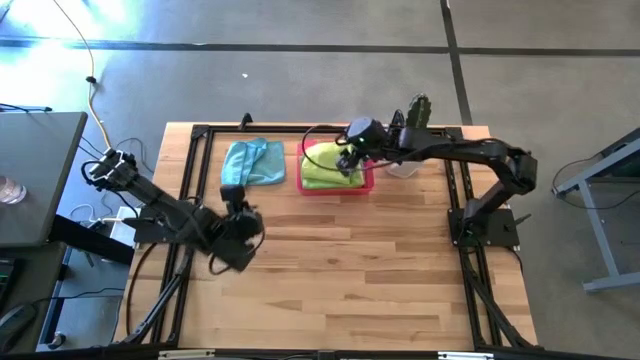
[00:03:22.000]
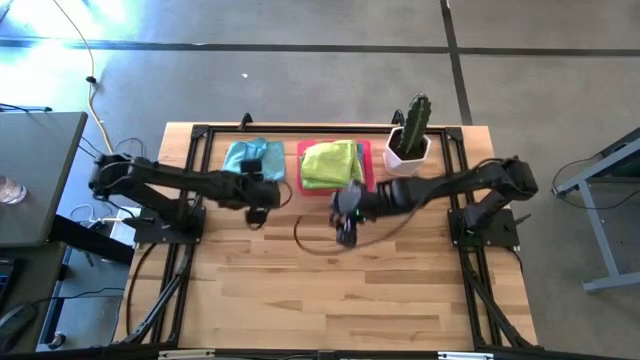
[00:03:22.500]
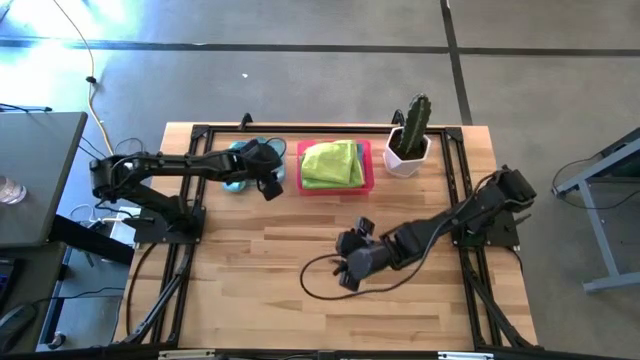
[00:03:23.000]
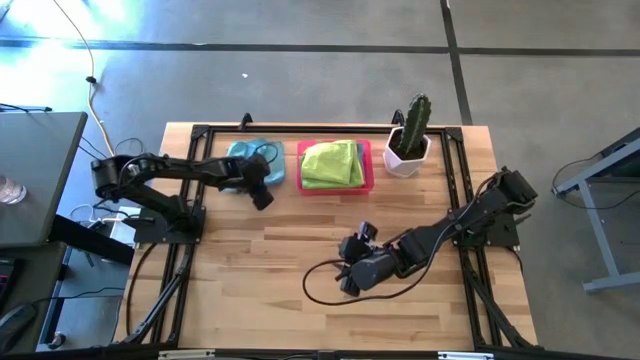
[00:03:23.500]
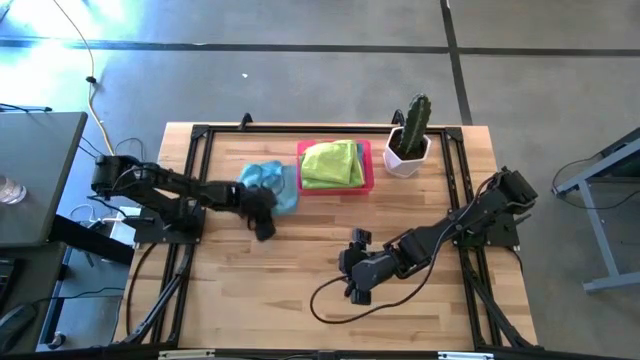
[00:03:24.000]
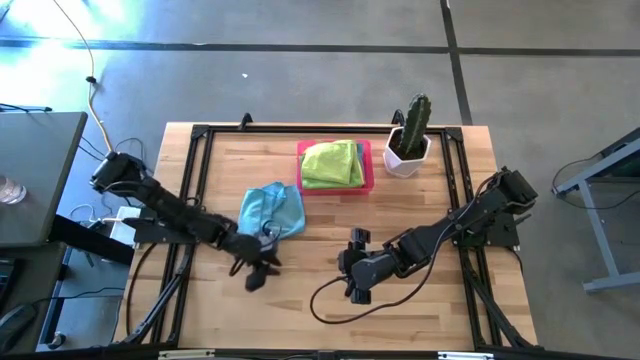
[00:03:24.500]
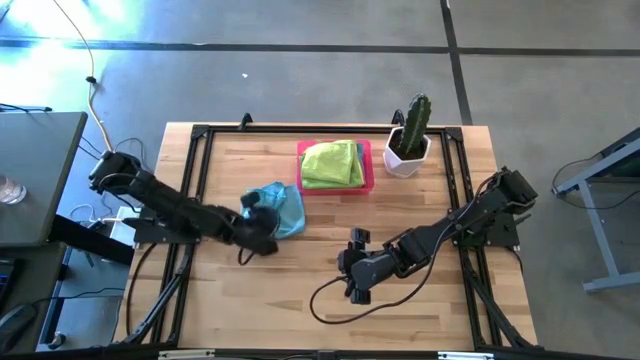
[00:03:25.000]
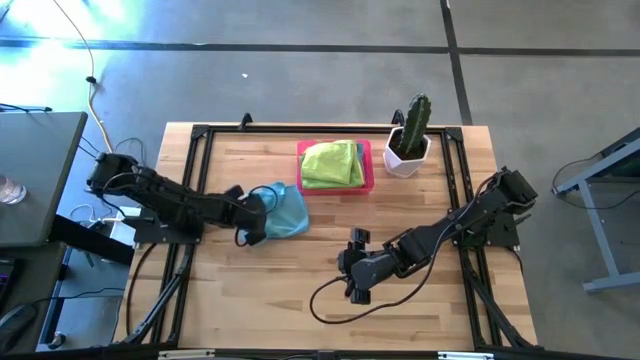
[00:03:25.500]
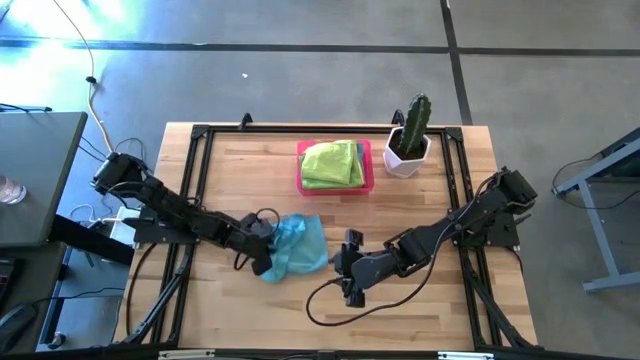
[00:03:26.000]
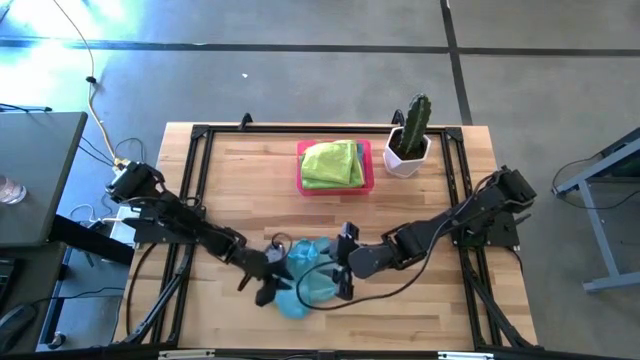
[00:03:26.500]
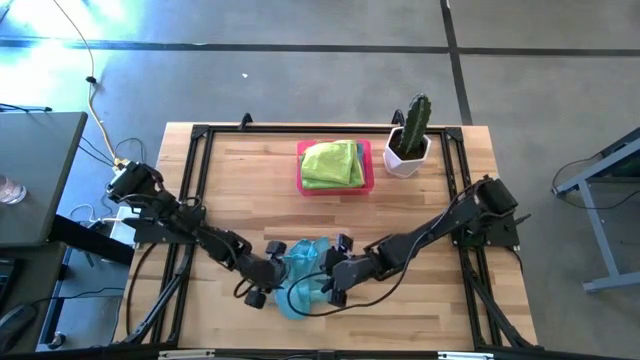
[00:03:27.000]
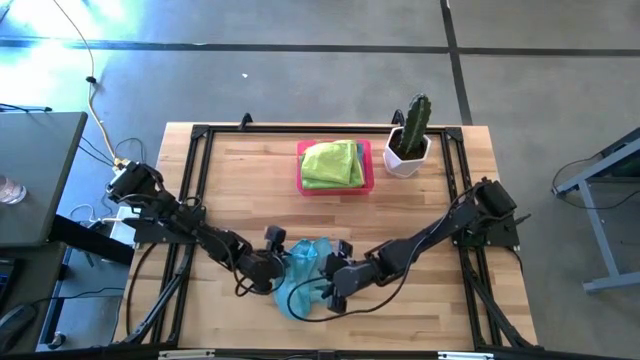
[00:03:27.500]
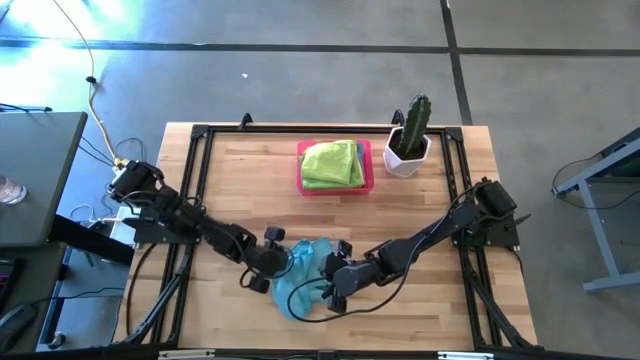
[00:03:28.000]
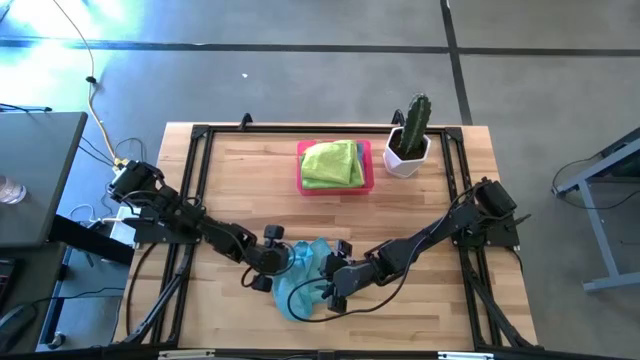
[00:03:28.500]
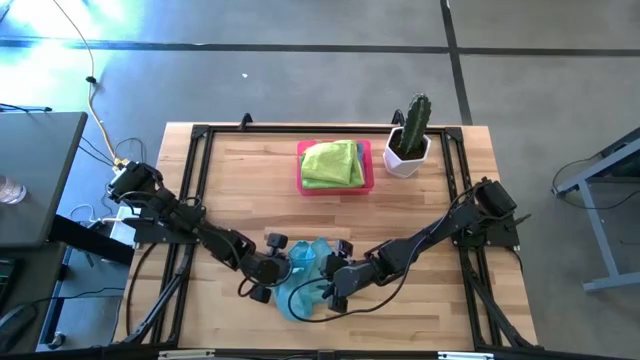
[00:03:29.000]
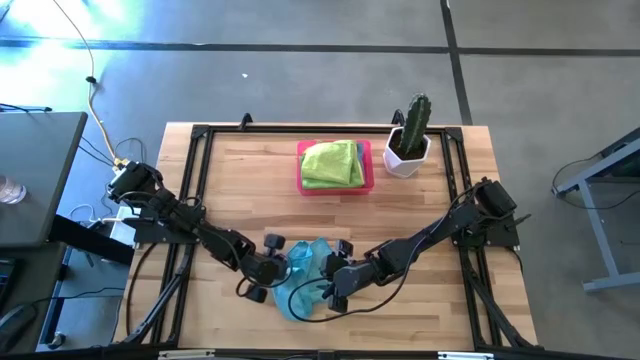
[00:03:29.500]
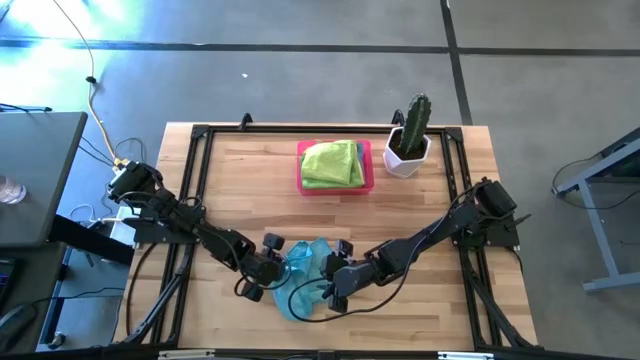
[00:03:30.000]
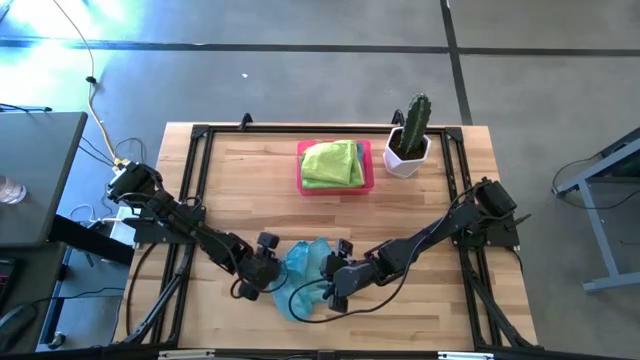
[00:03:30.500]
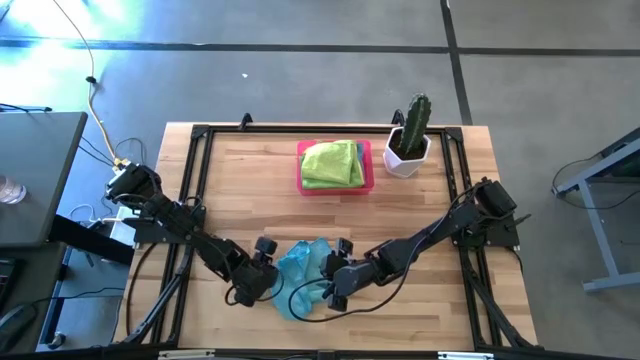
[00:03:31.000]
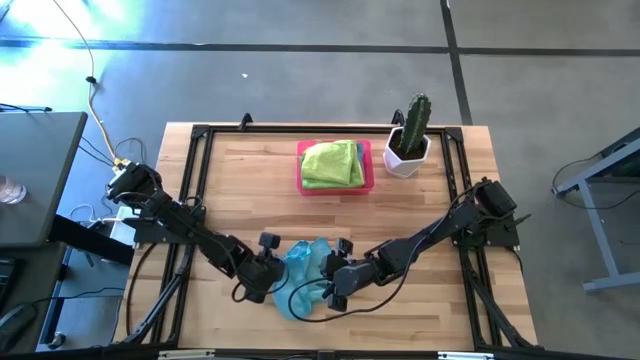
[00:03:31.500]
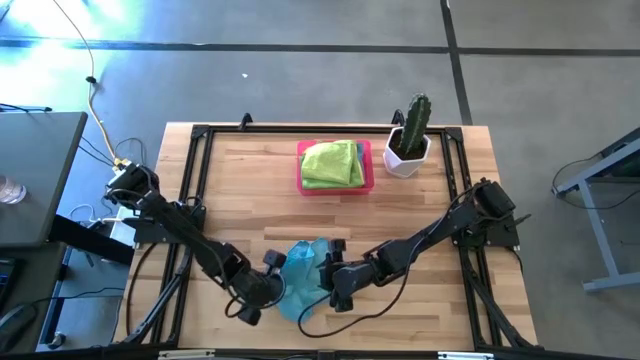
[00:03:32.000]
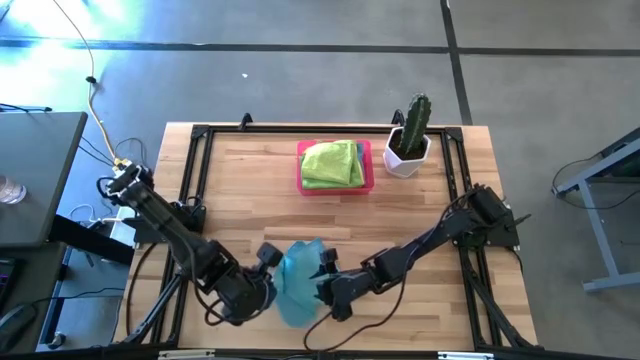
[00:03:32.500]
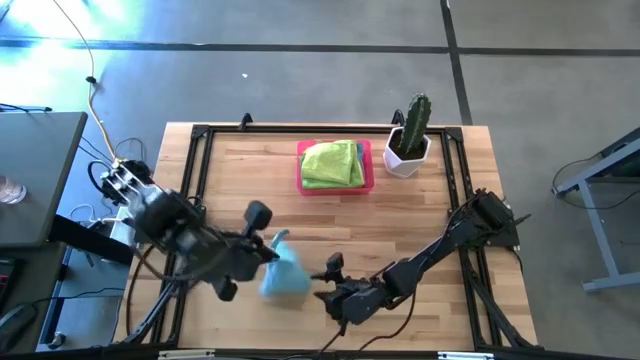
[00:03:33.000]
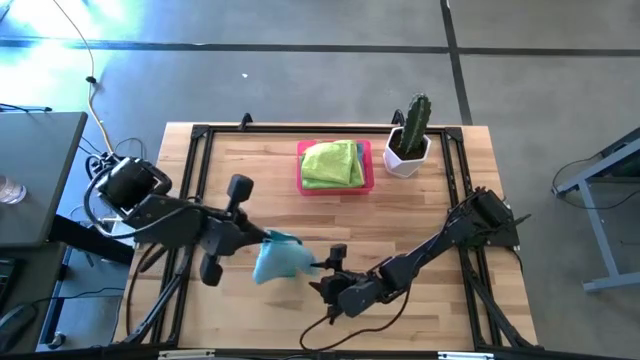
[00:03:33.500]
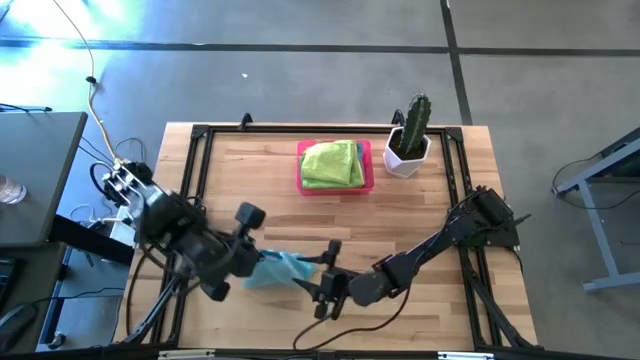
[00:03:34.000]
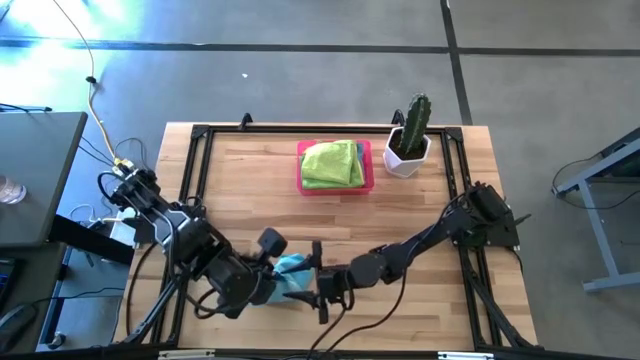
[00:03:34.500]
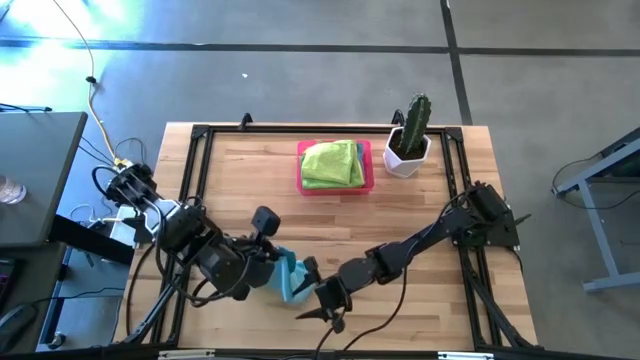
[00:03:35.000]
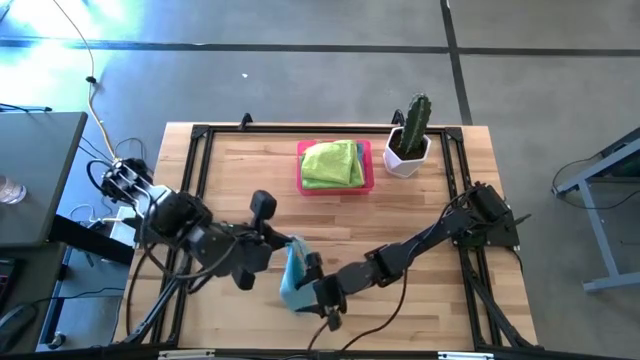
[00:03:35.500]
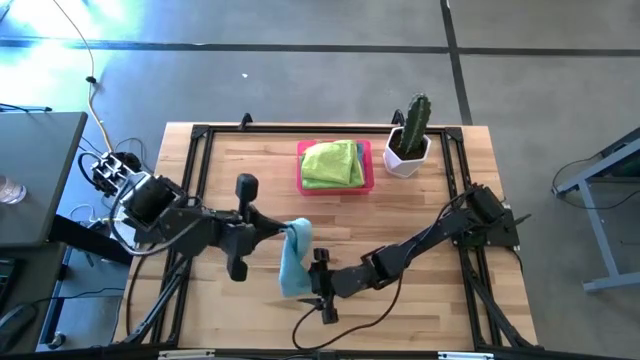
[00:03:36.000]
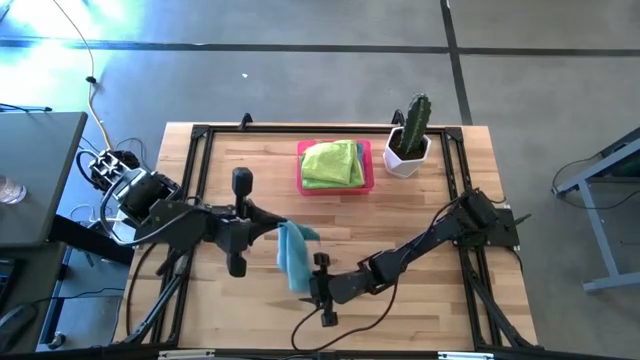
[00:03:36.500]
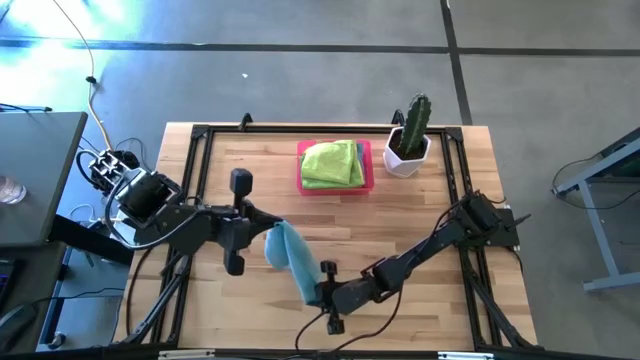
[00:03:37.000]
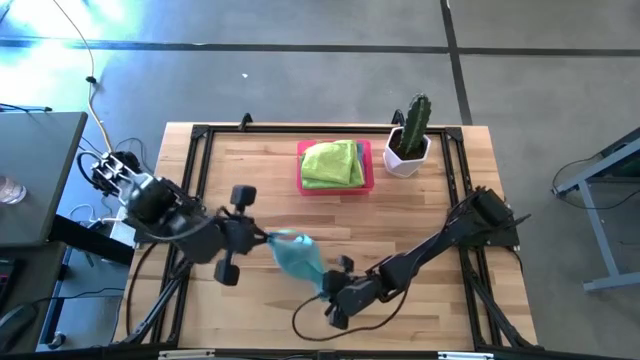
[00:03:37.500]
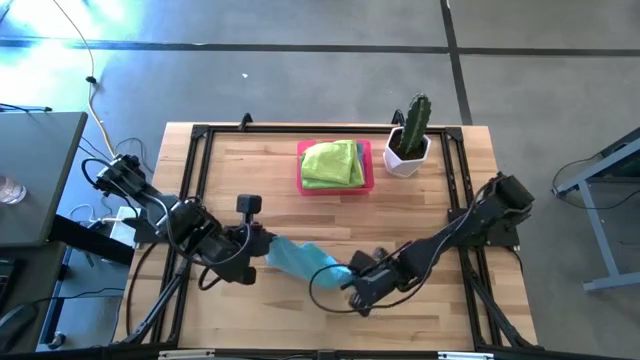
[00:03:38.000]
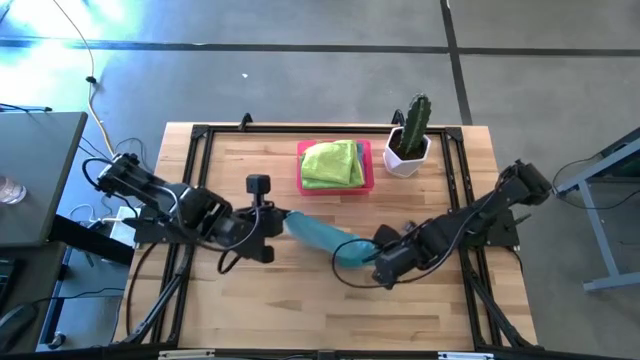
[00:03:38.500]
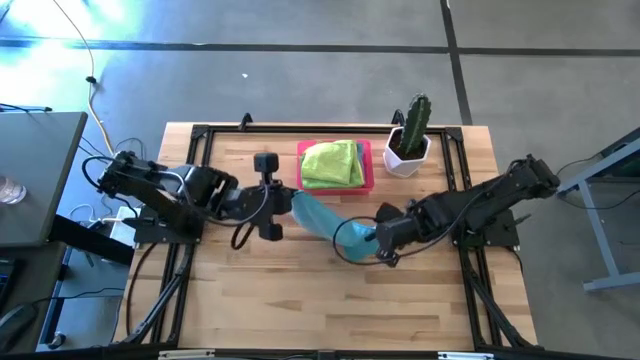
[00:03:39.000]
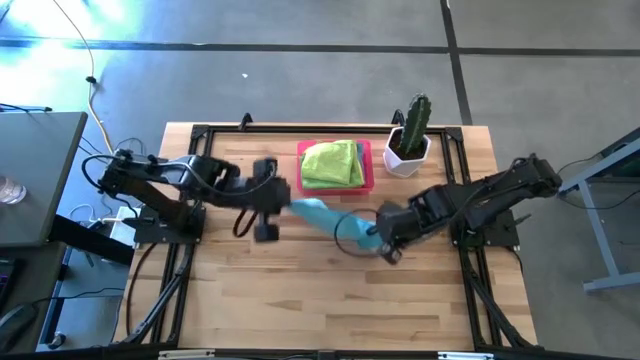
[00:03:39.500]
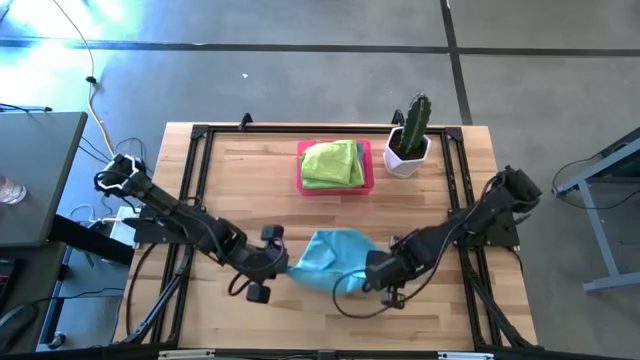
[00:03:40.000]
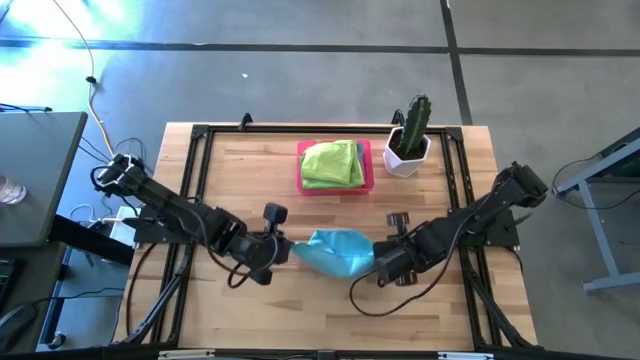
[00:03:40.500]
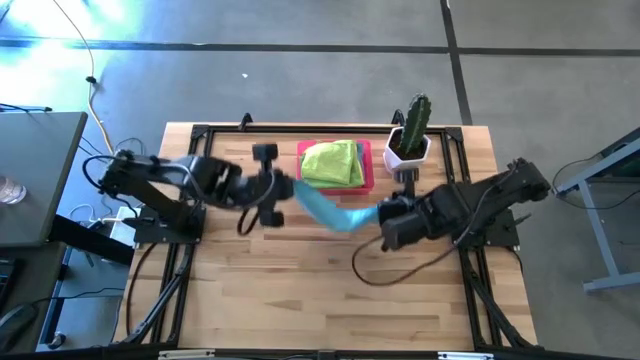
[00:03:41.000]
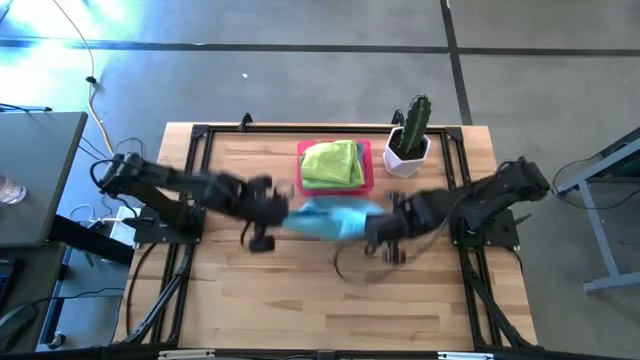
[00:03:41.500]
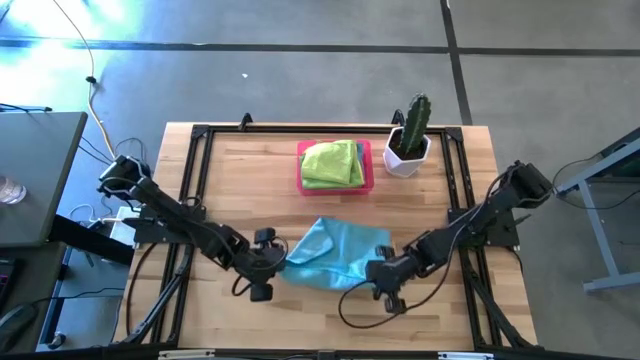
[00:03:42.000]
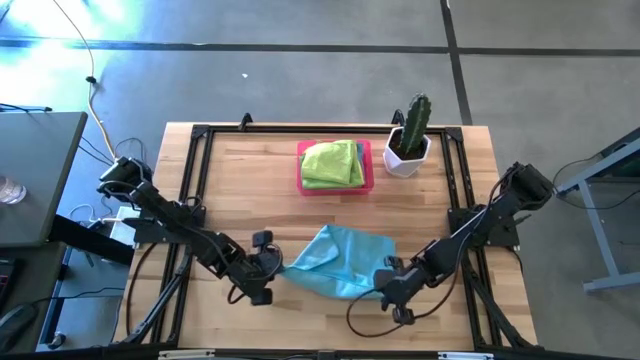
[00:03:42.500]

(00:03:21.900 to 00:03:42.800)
Task: Fold microfiber towels
Fold the blue microfiber cloth
